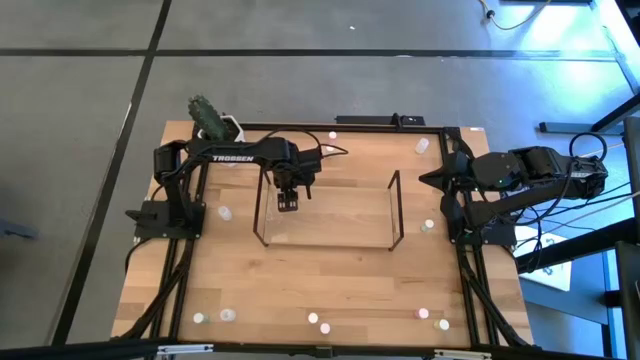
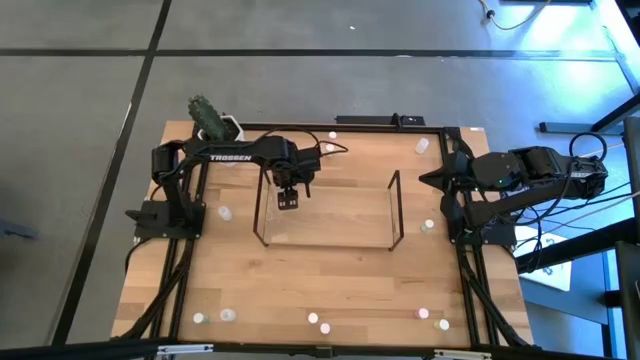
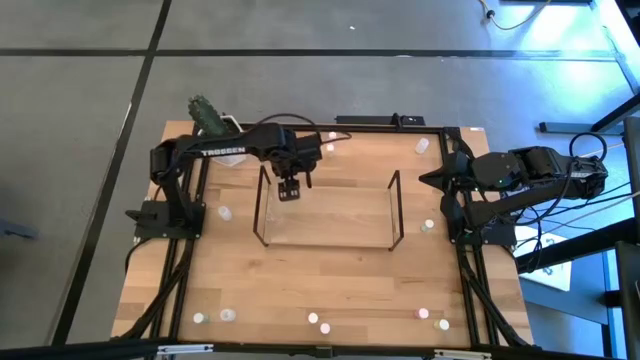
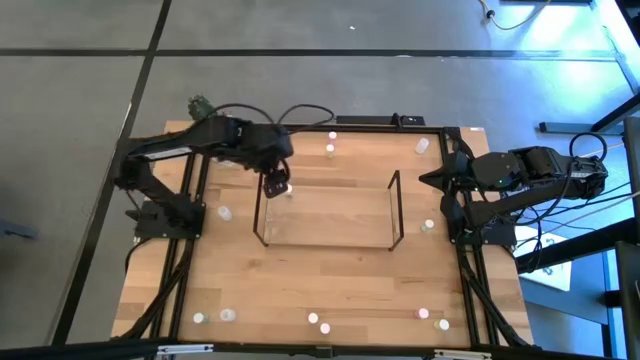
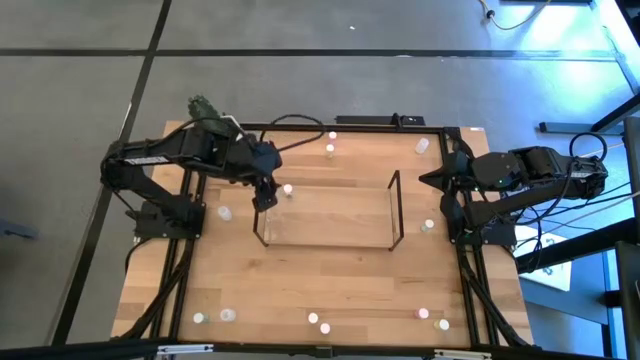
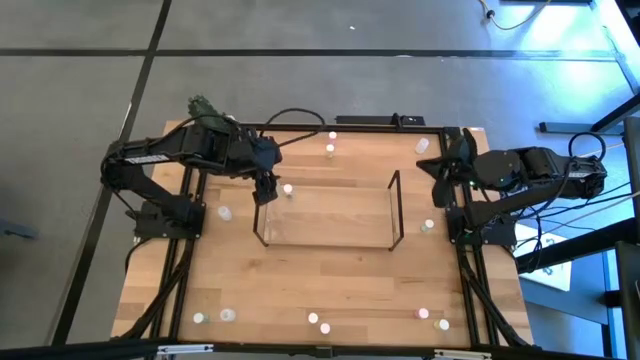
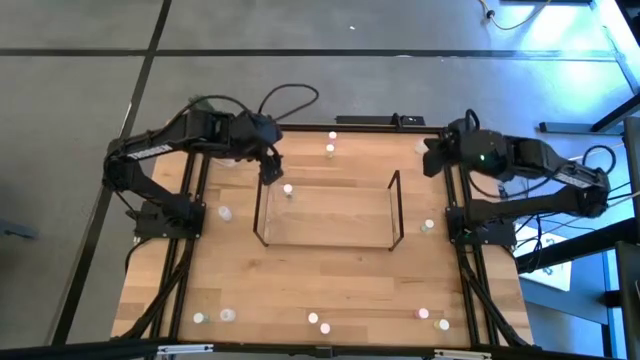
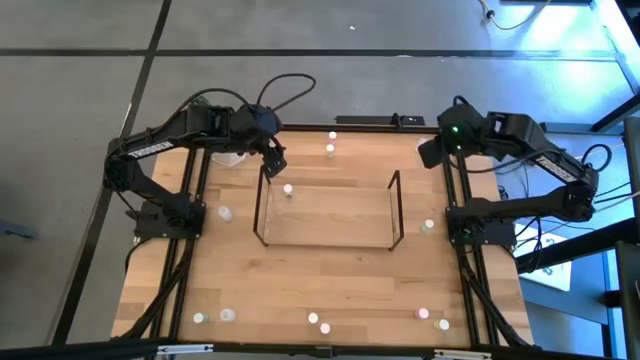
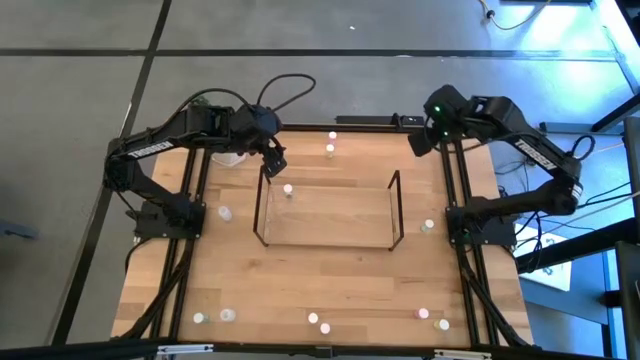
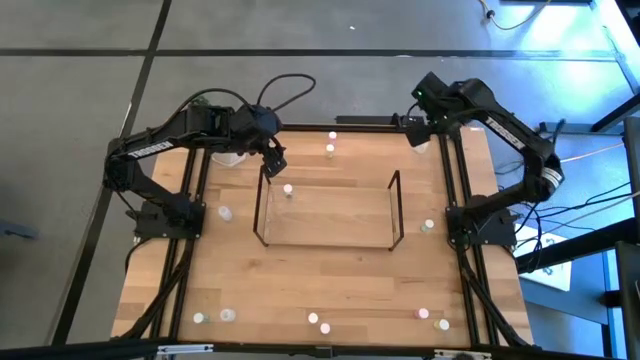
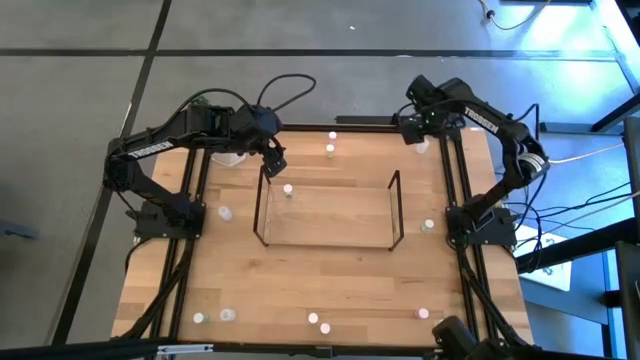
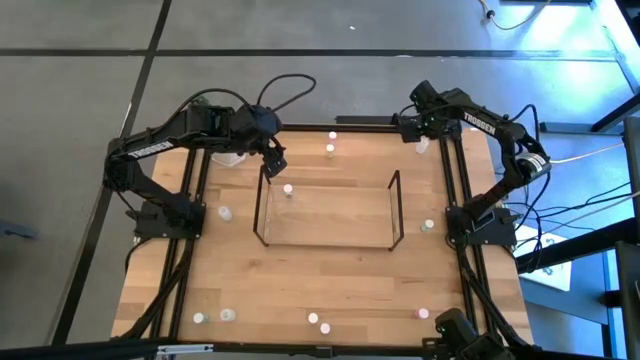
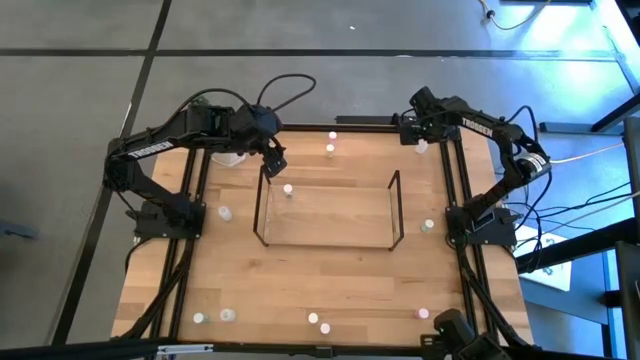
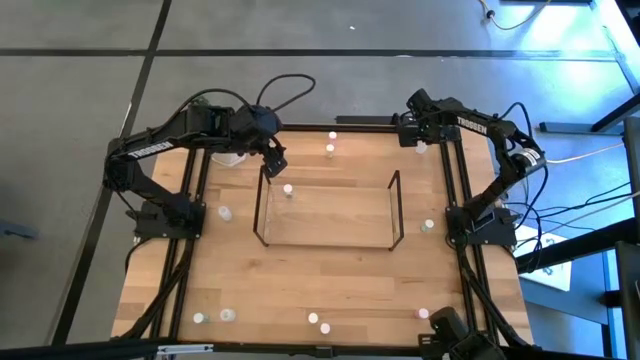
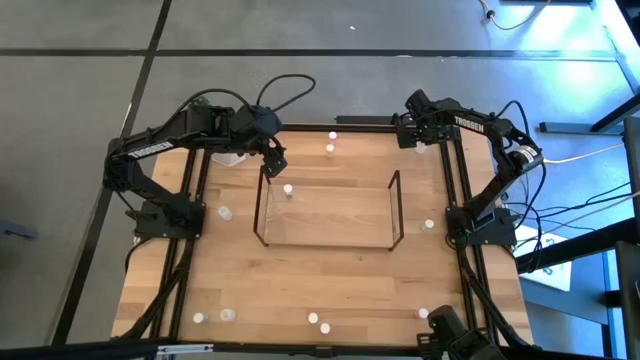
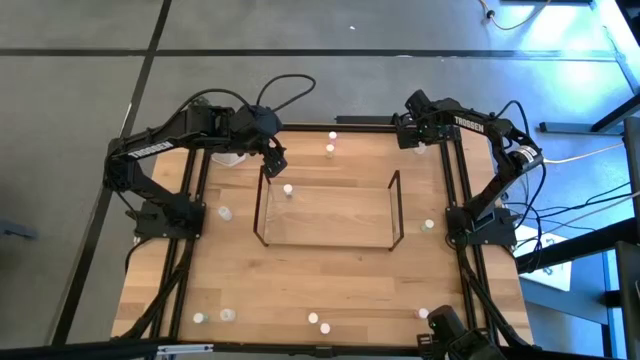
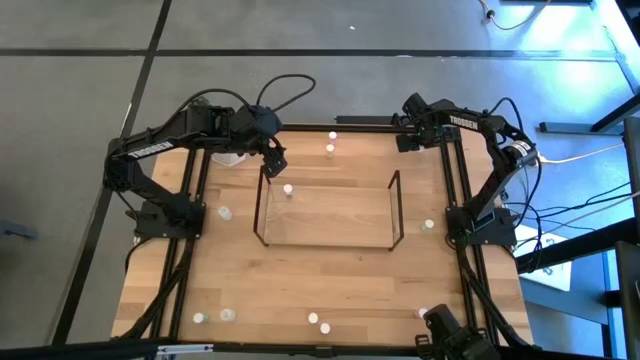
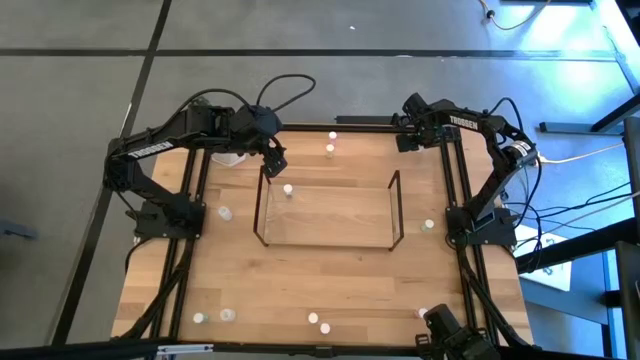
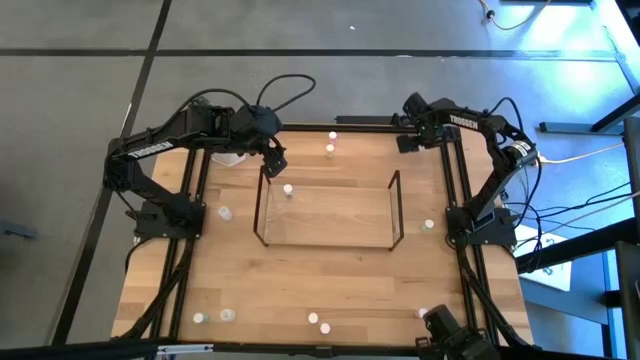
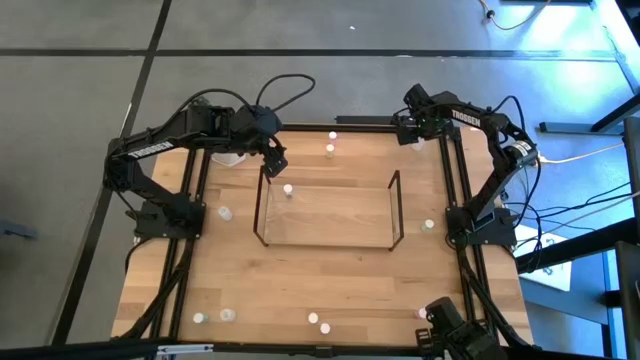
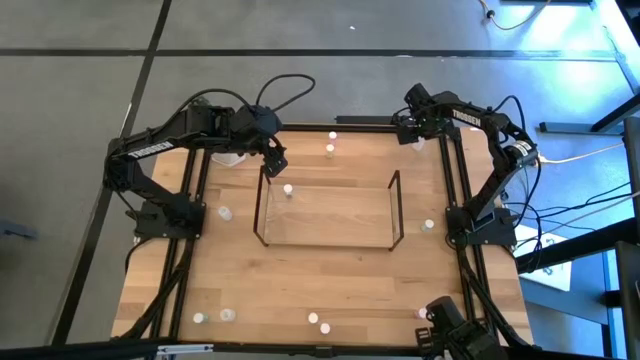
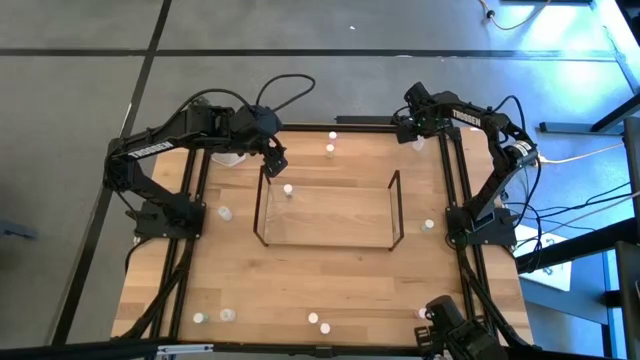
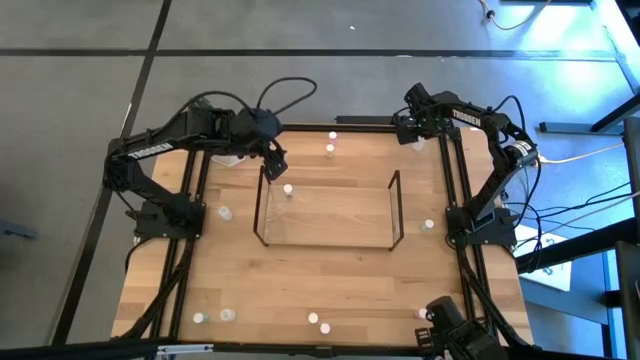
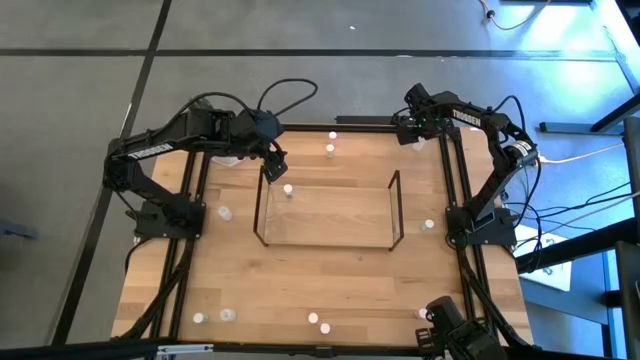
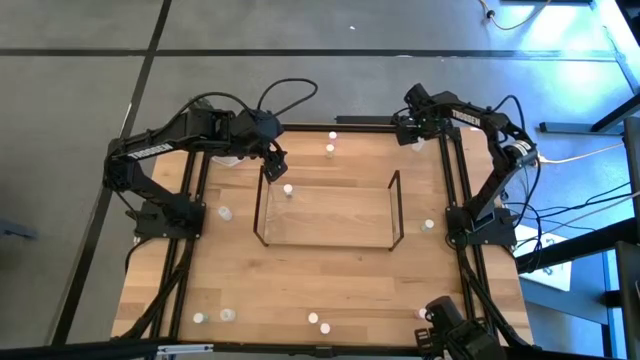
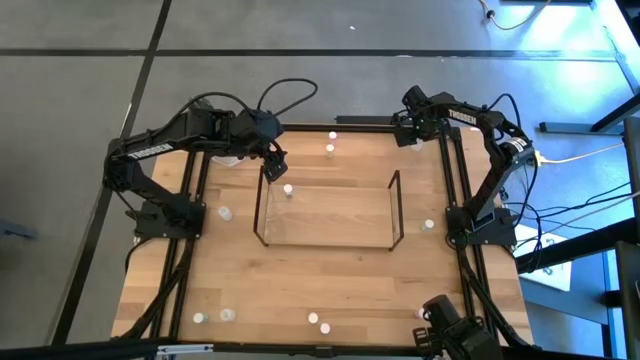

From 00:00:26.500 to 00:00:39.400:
Task: Pick and place medicine bottles onto shelf by color
Put the top white pill bottle on the shelf

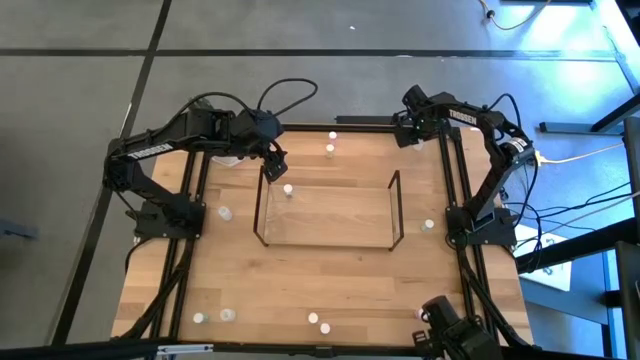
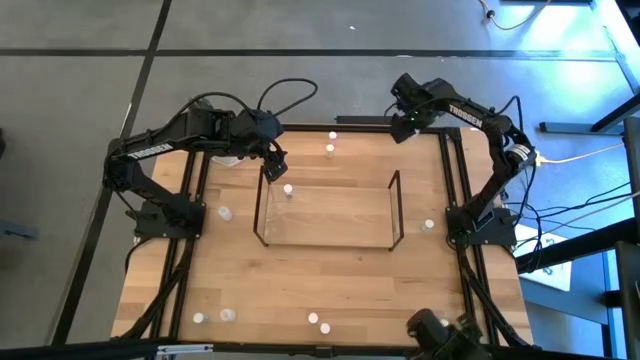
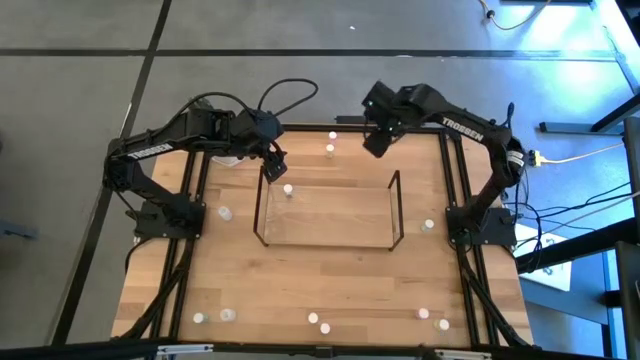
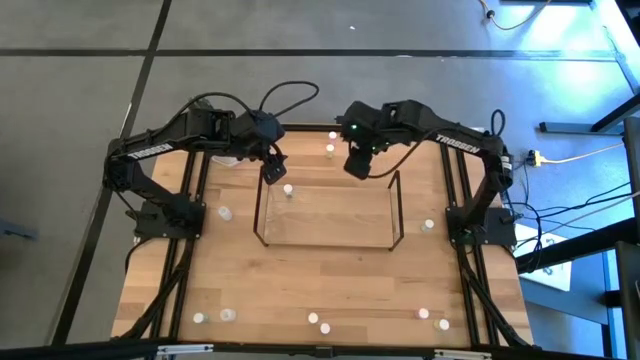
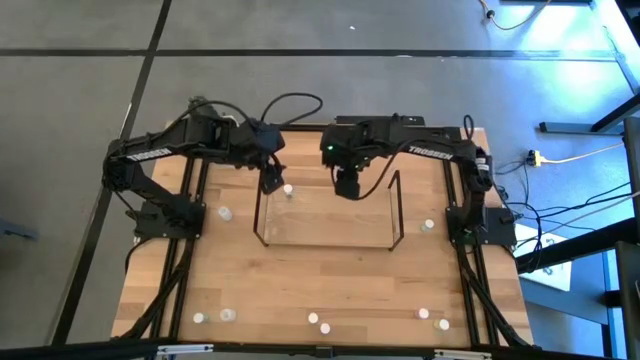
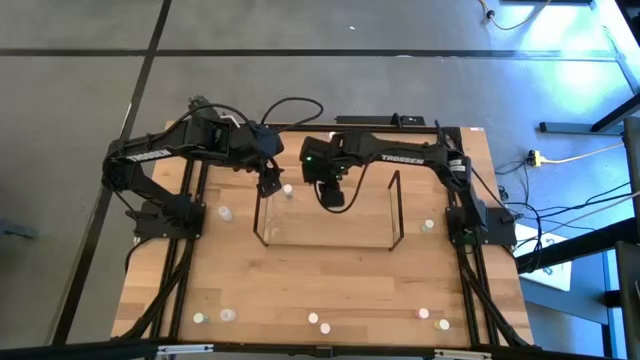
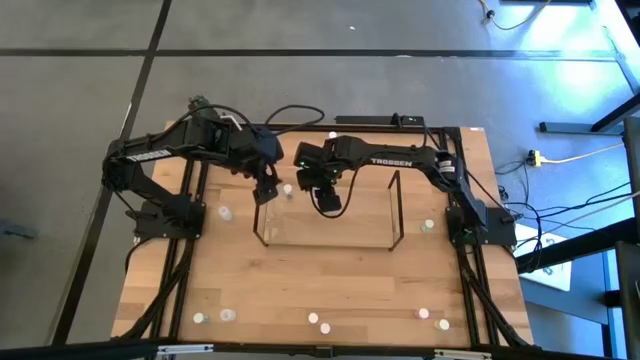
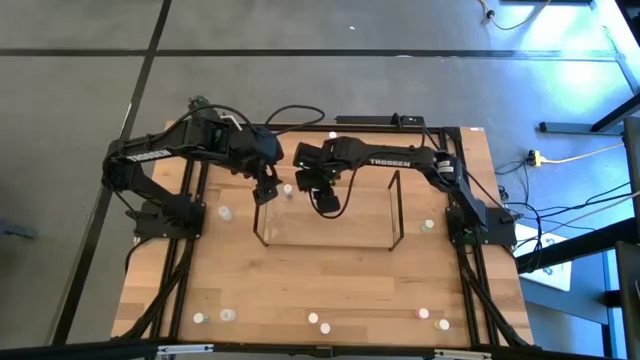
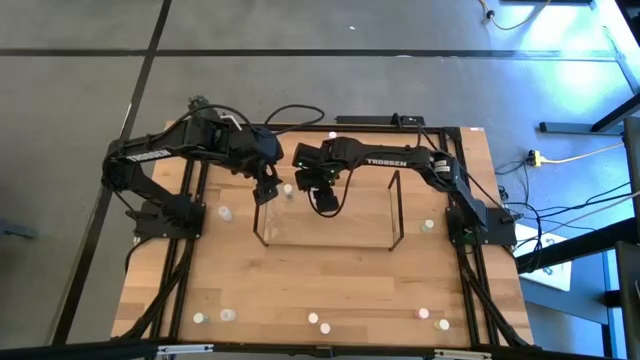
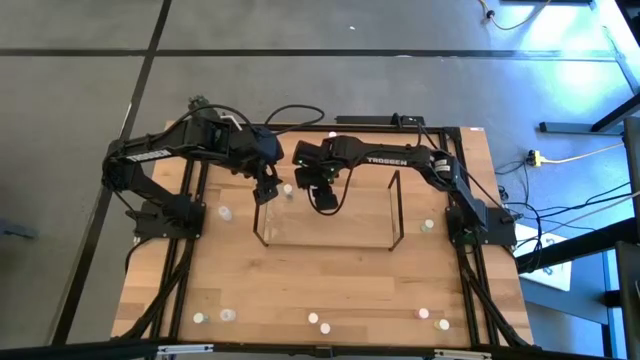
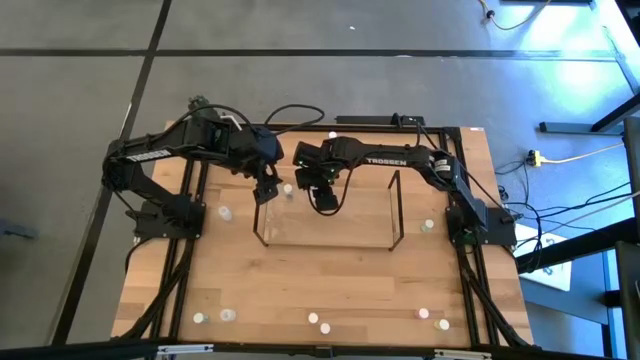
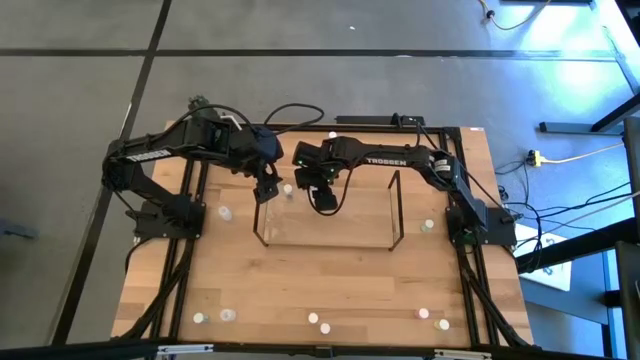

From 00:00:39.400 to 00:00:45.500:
Put the top white pill bottle on the shelf

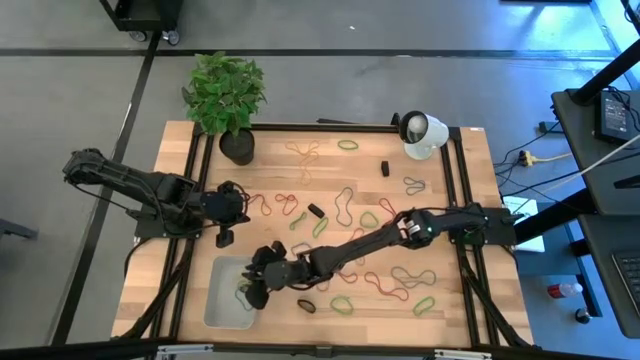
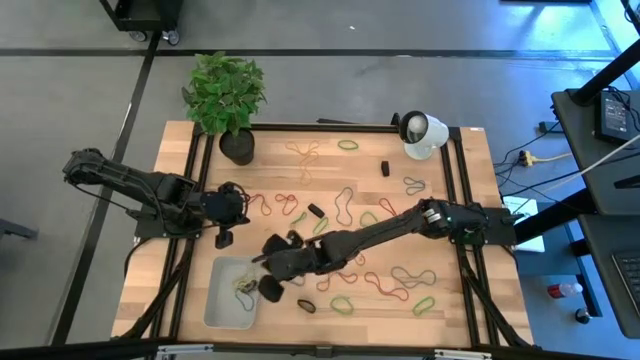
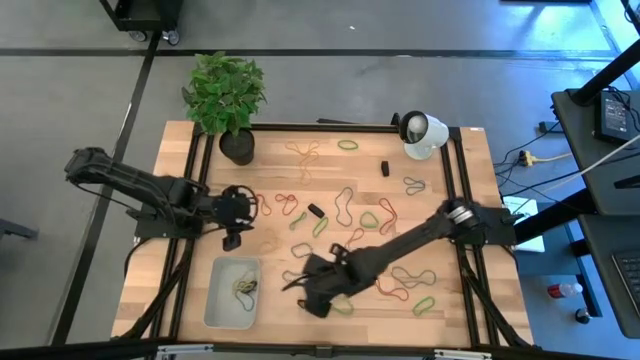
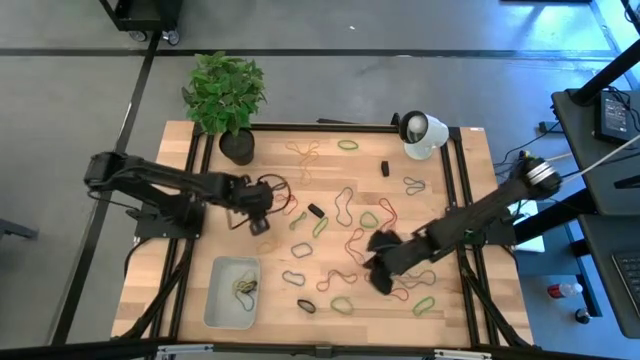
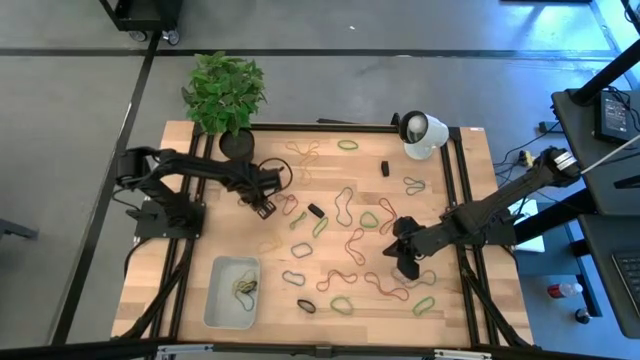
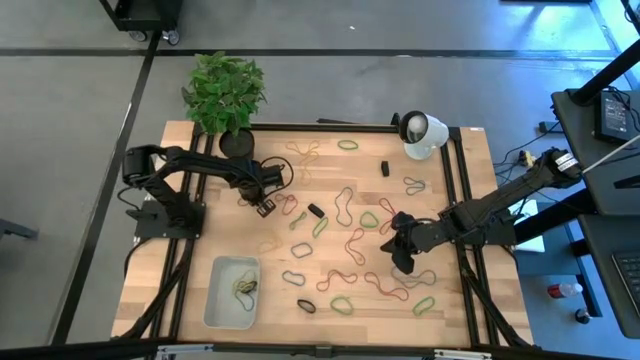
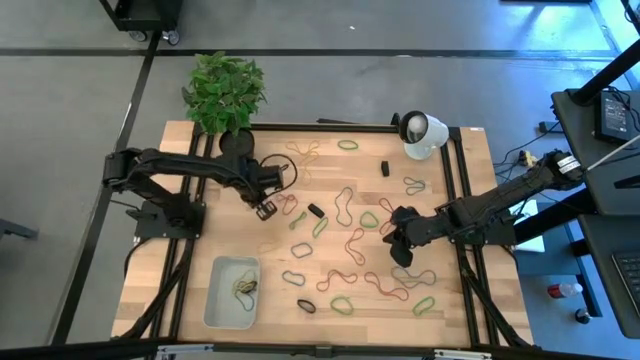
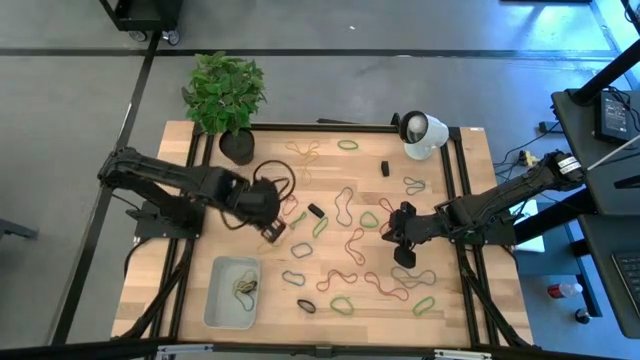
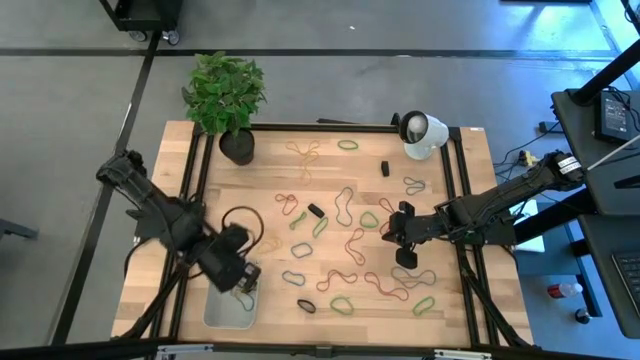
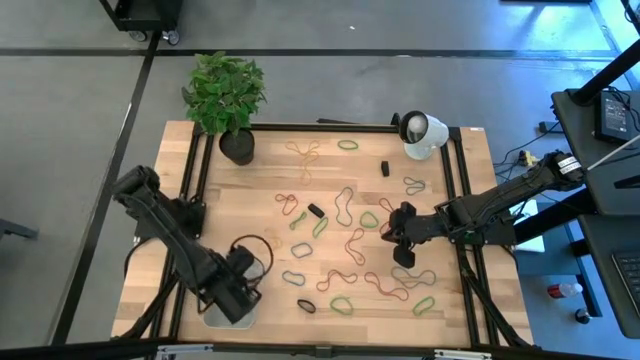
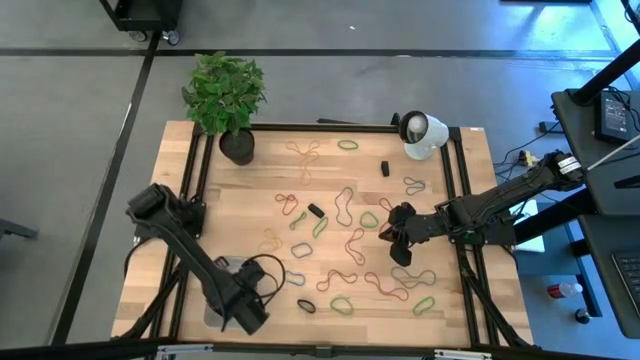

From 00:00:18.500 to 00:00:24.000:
Task: Pick and place rubber bands into bin
Put the red rubber band into the bin
